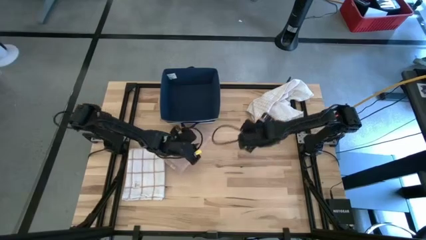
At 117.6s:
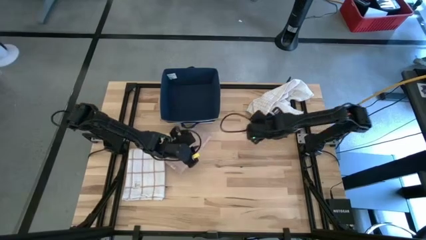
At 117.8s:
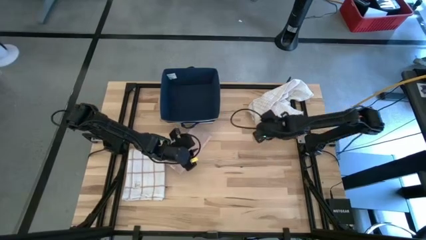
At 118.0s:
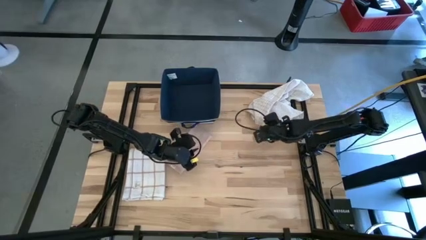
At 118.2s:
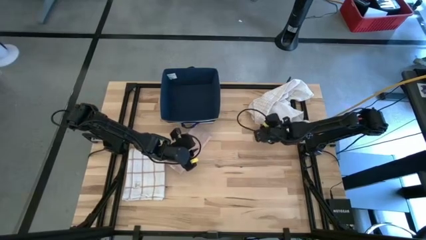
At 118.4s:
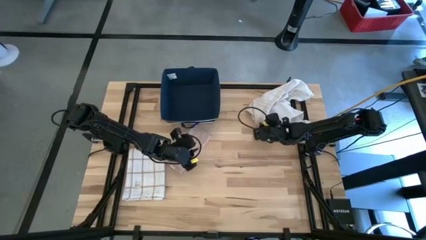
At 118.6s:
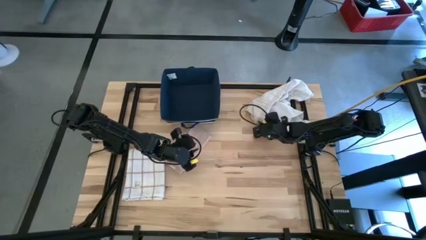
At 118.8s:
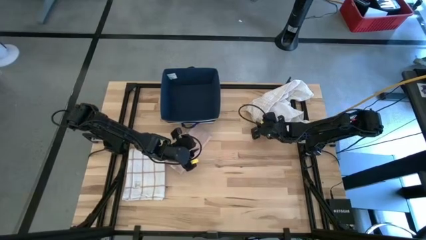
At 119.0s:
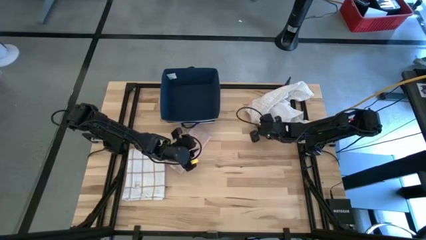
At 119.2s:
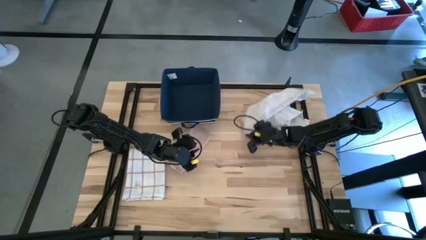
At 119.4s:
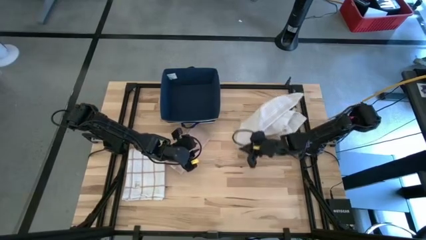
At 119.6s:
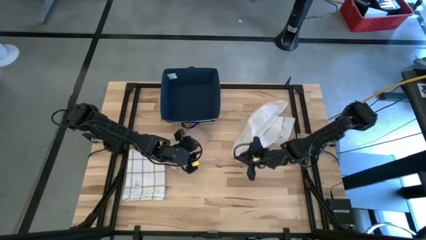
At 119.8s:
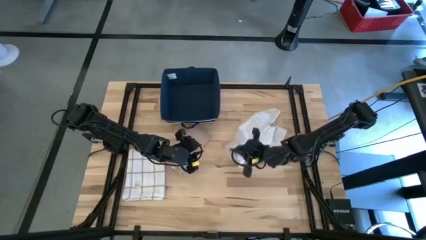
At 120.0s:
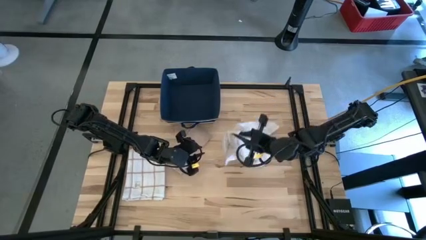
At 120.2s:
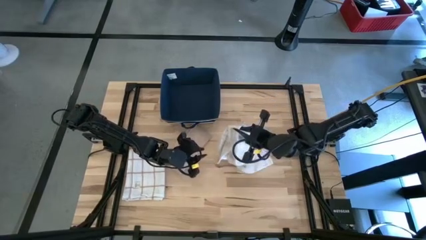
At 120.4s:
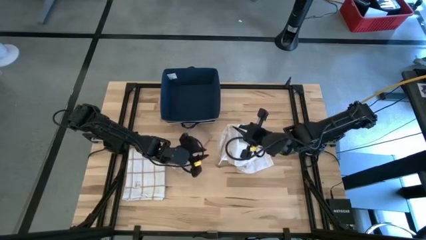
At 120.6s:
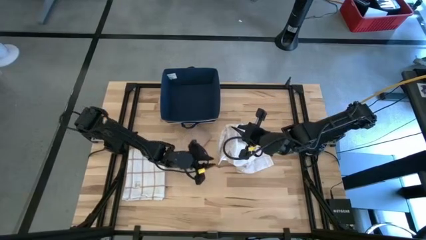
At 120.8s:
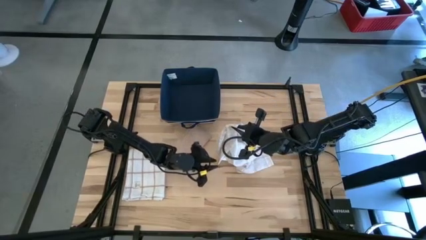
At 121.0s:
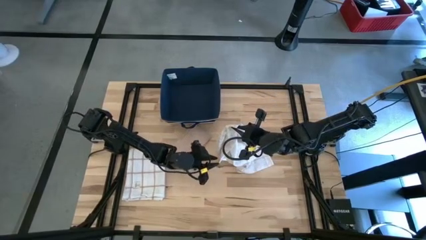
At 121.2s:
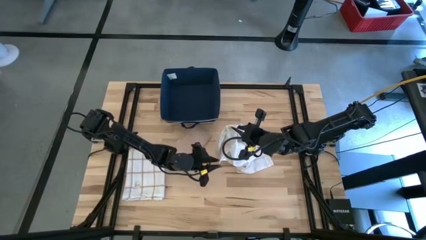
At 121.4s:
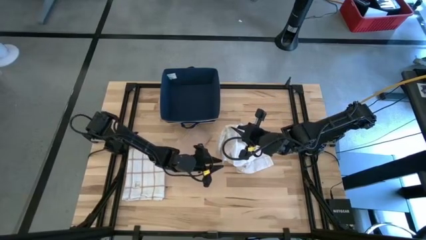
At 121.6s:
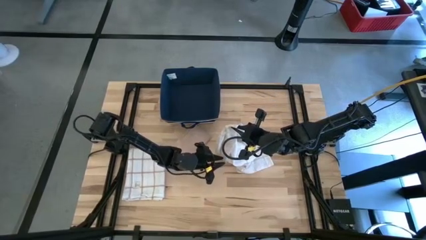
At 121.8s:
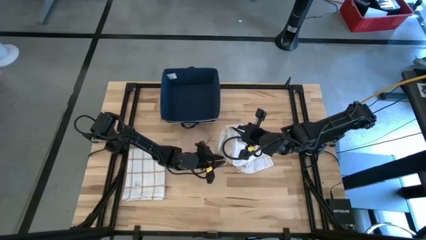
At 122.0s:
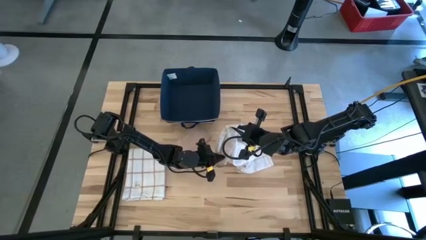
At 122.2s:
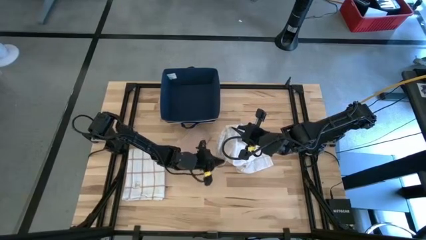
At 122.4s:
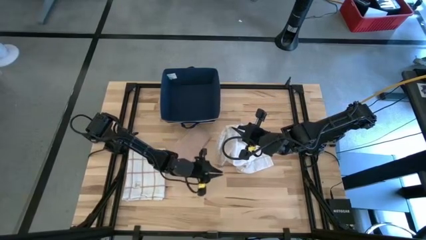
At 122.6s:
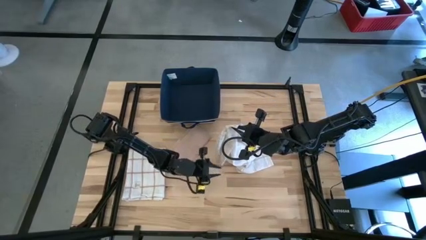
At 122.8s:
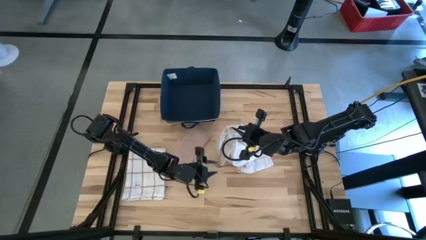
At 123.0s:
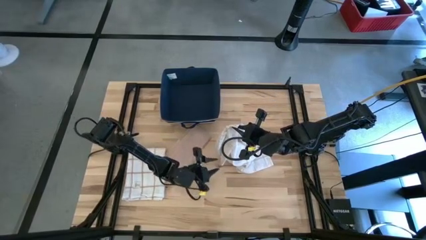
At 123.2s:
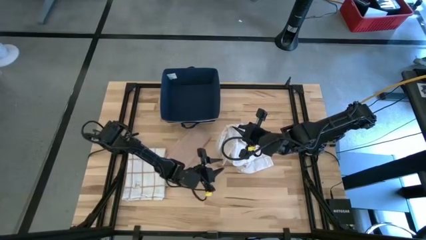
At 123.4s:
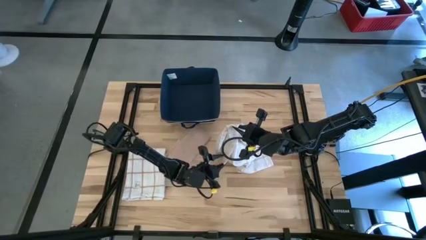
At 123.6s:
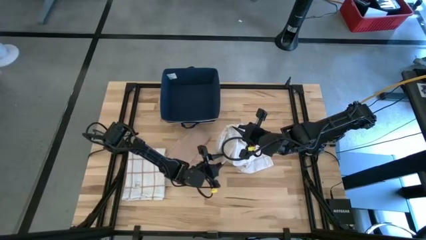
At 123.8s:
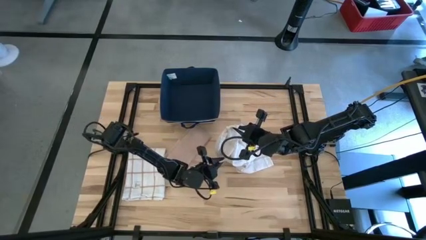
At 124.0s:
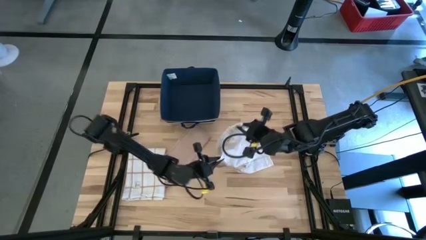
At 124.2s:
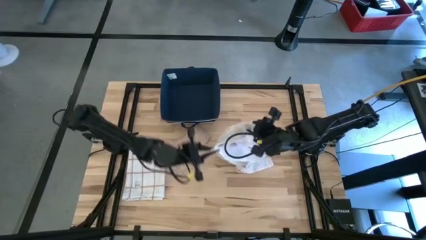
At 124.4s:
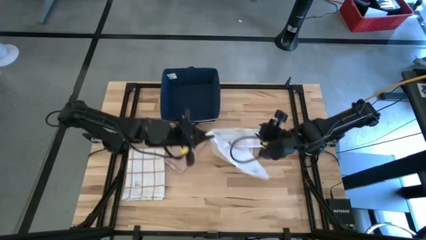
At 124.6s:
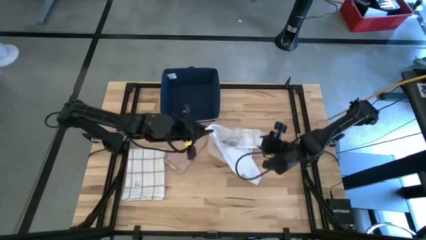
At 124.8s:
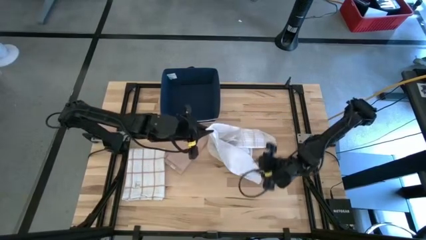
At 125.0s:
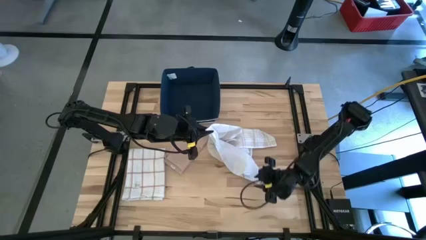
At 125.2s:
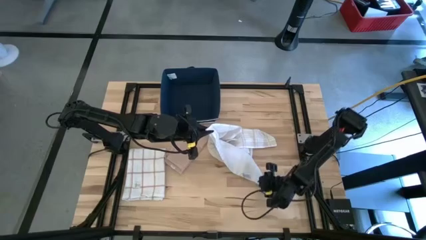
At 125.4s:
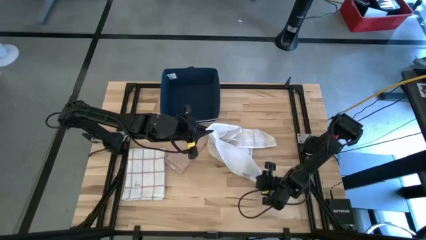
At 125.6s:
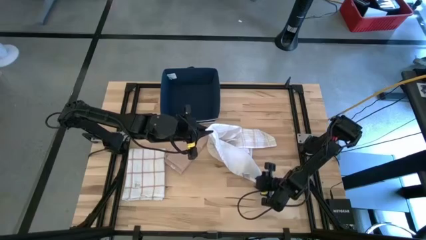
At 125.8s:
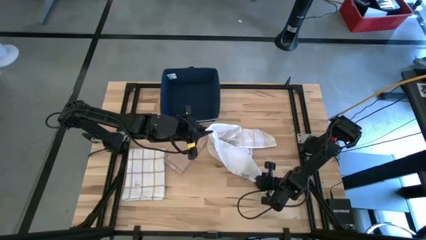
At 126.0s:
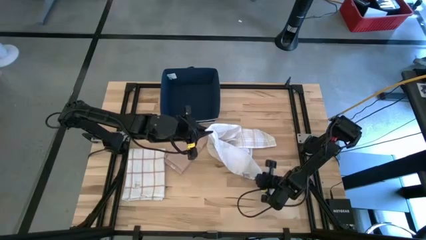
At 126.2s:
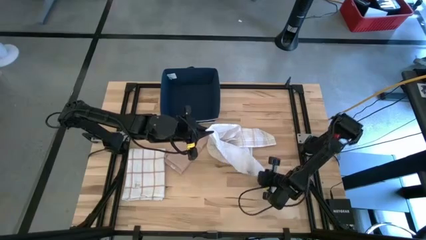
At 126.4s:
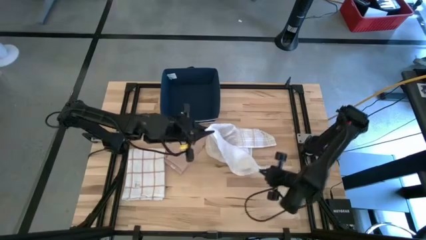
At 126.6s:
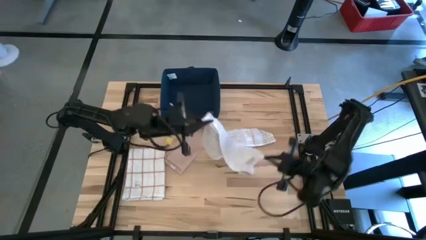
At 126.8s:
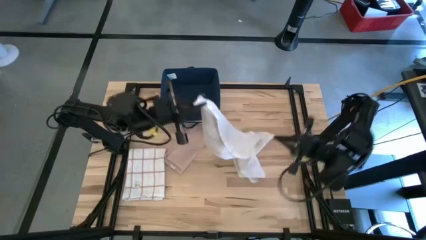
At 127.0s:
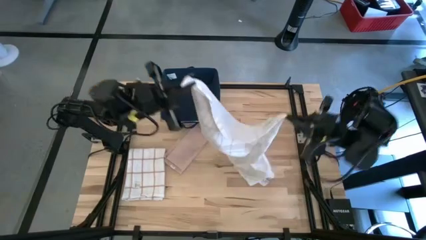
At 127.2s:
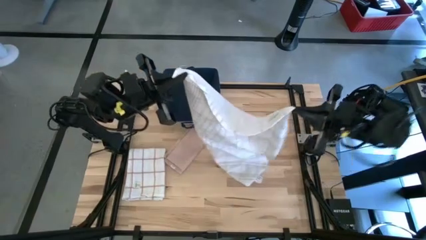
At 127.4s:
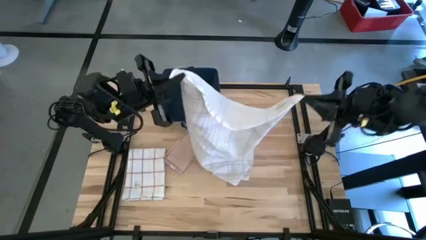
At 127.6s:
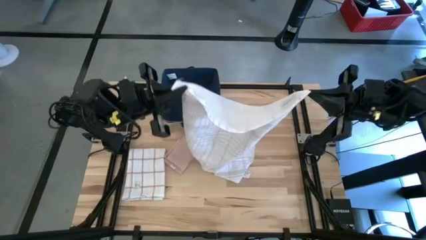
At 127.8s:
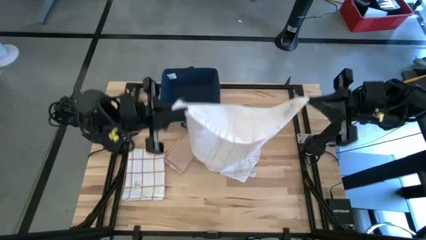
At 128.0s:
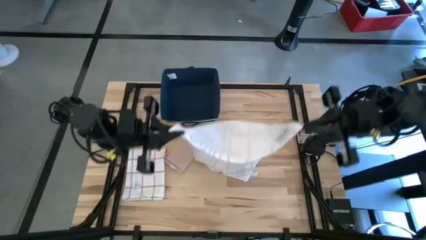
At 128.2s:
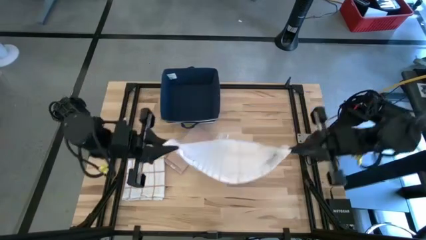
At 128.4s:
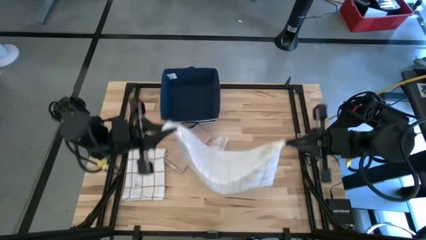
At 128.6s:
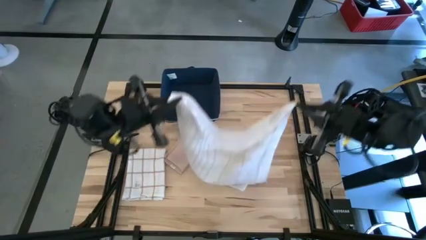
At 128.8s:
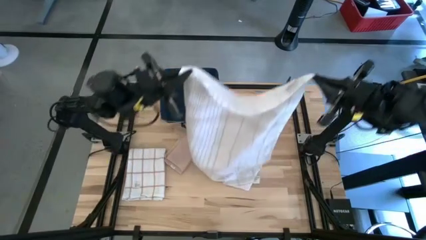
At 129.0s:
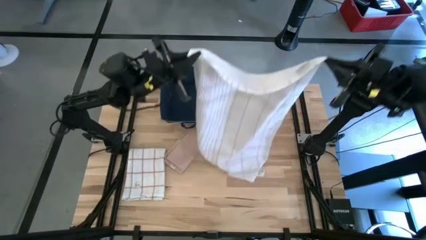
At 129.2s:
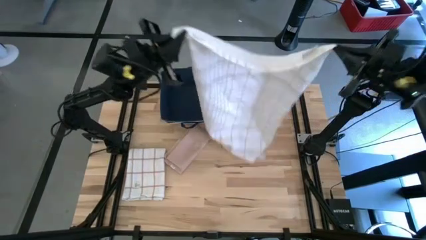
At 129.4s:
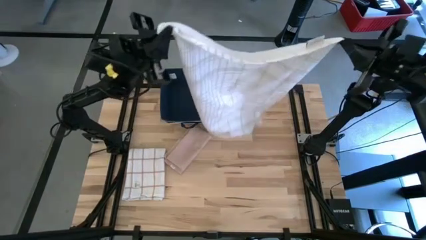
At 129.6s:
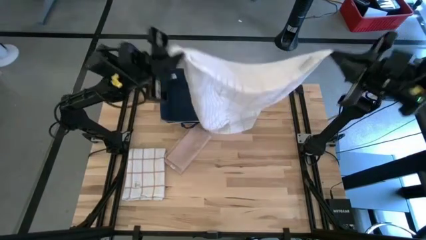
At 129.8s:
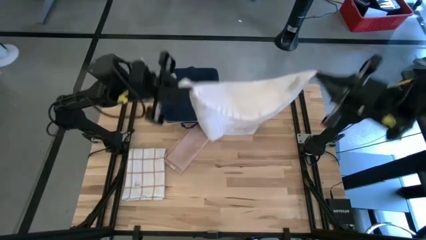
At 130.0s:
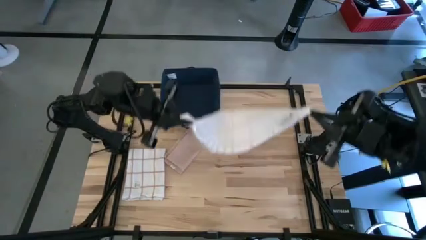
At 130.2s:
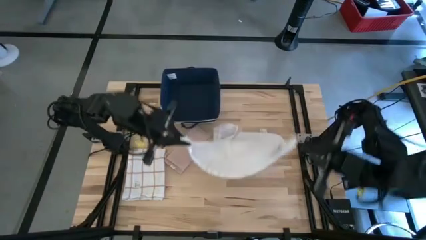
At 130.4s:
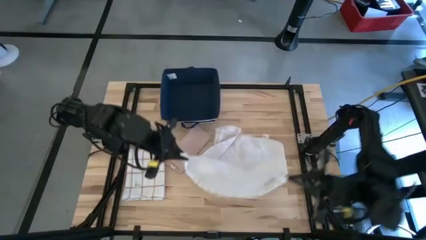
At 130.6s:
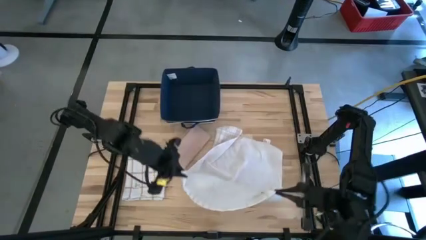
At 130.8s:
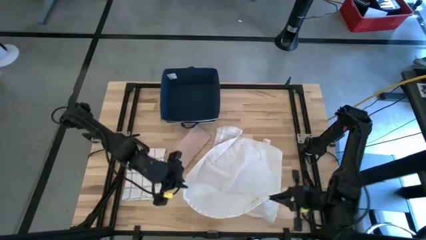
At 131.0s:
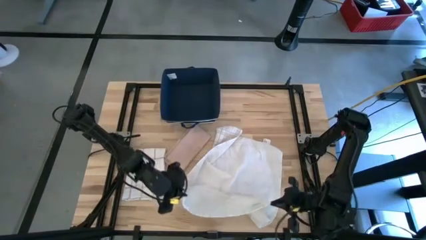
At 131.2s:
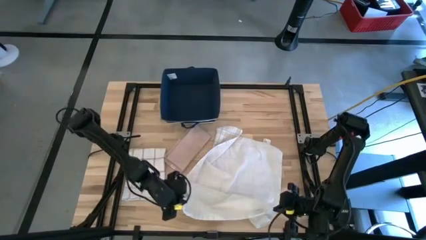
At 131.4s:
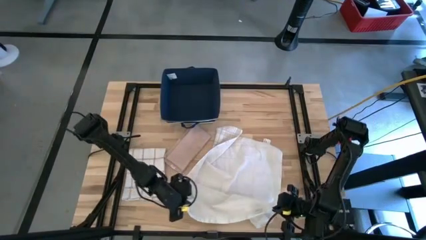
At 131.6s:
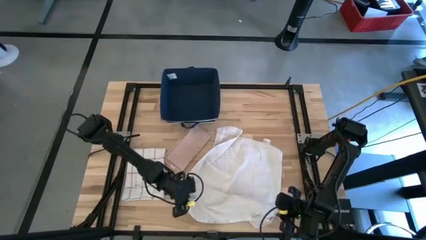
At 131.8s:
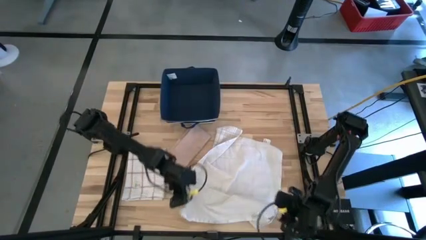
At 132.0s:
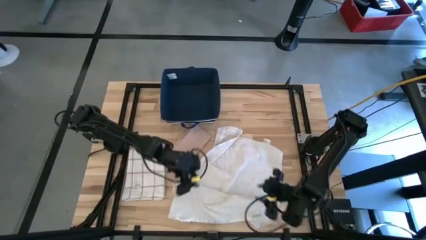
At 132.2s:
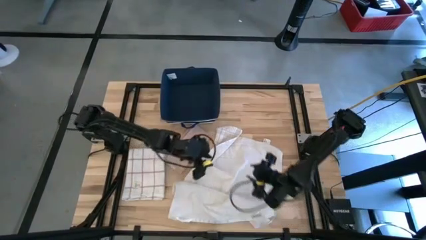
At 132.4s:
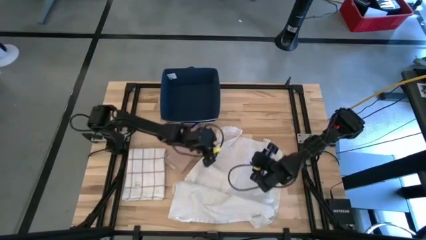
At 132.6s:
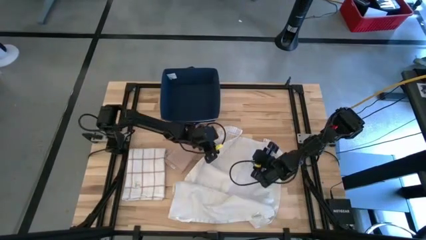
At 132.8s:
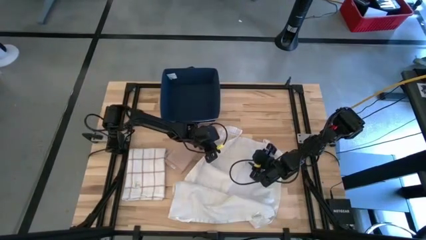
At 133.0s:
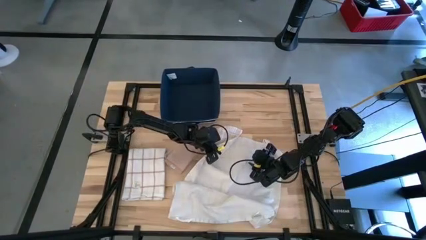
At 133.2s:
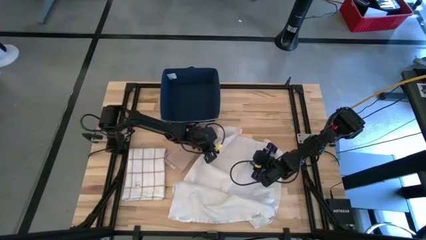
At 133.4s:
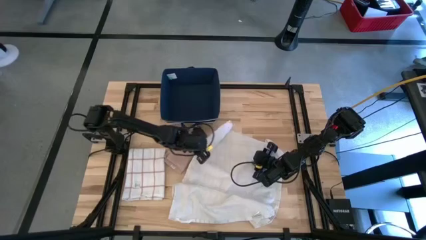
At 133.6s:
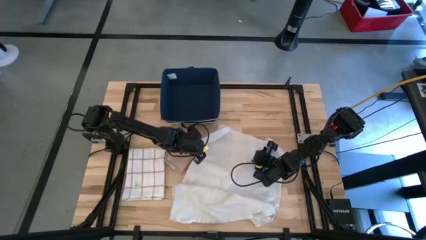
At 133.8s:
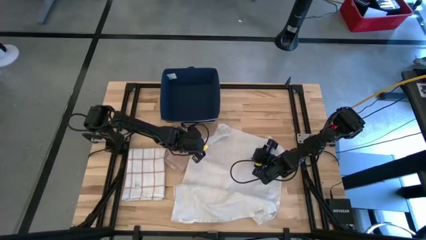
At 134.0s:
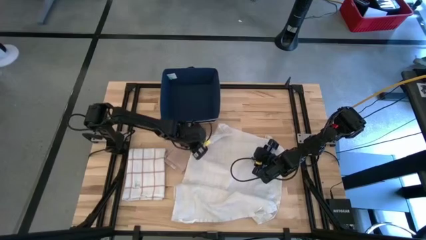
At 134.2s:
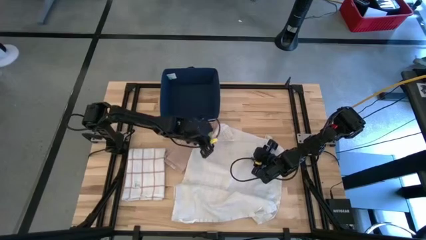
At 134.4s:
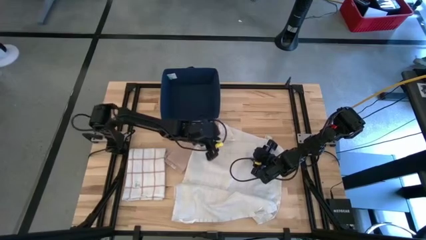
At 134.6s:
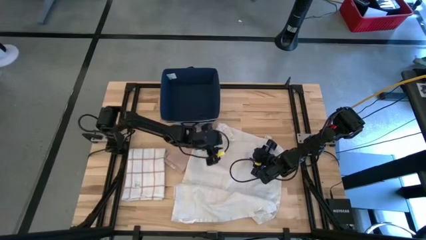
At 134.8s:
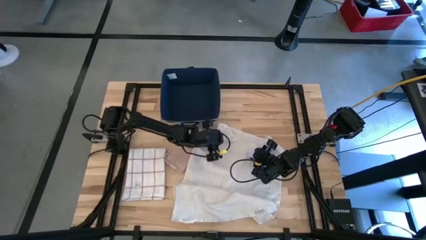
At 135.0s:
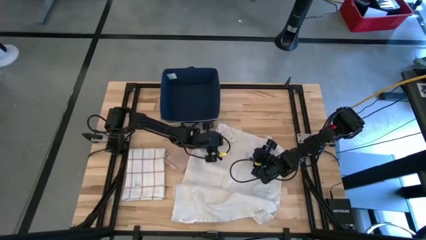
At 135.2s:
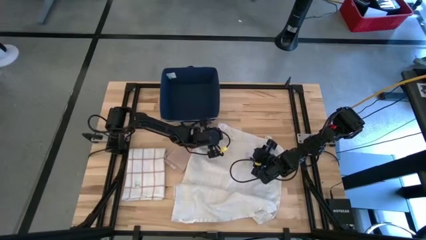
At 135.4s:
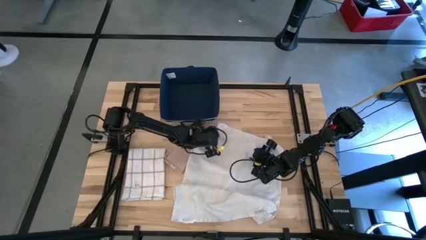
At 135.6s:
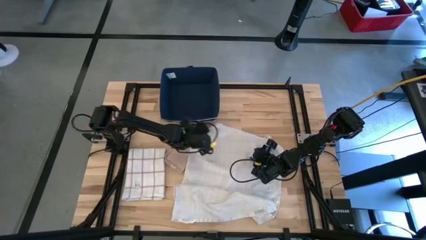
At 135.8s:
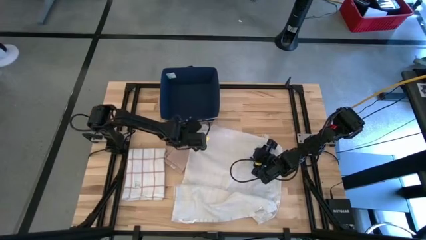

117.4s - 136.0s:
Task: Fold towel
Fold the right white patterned towel
